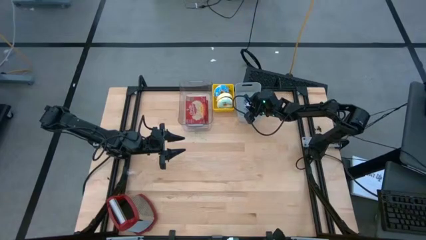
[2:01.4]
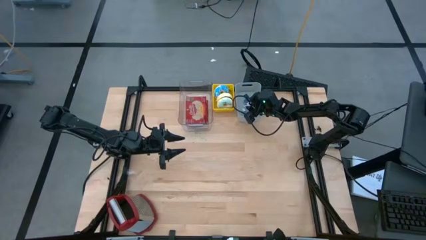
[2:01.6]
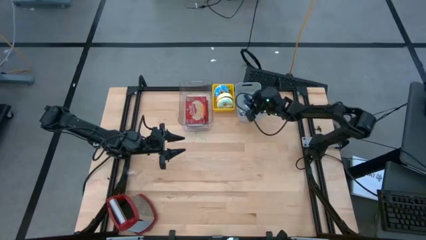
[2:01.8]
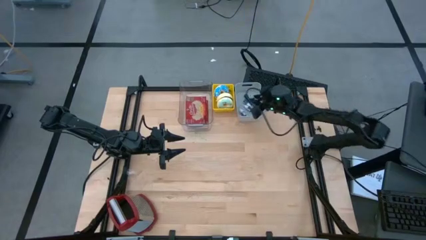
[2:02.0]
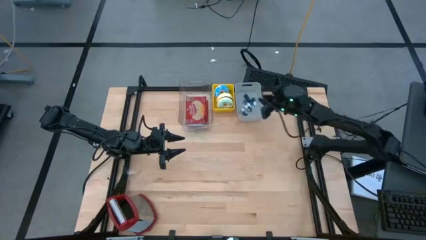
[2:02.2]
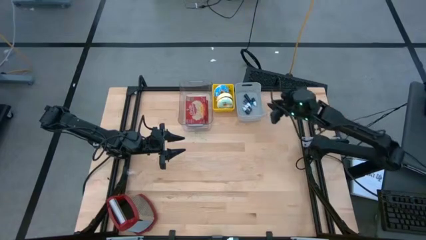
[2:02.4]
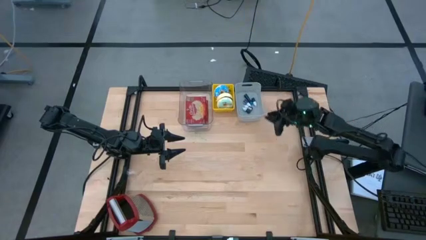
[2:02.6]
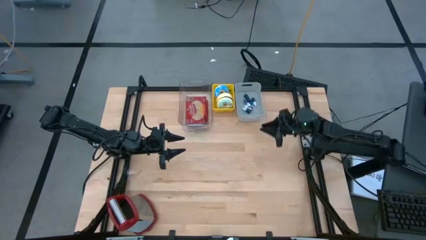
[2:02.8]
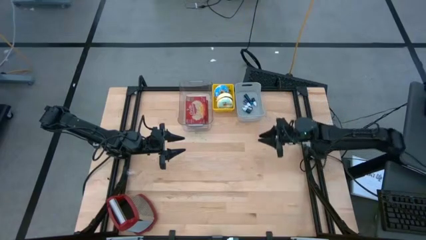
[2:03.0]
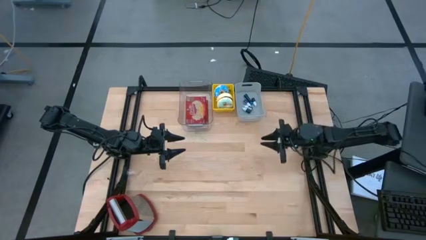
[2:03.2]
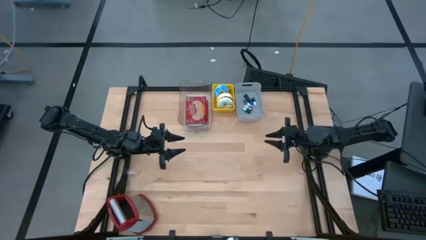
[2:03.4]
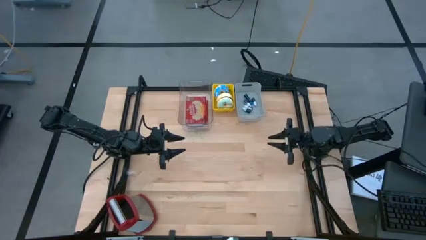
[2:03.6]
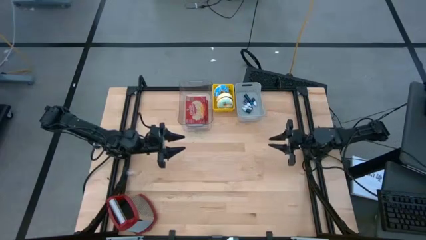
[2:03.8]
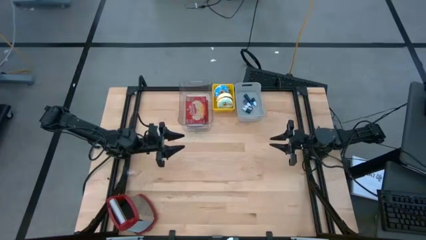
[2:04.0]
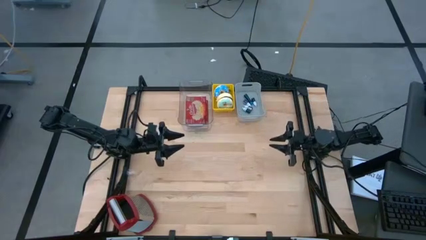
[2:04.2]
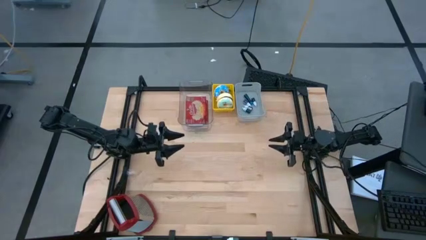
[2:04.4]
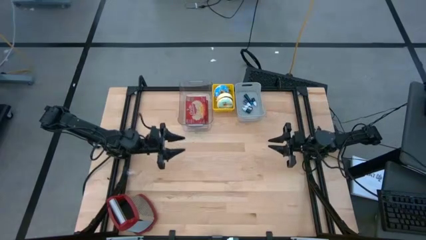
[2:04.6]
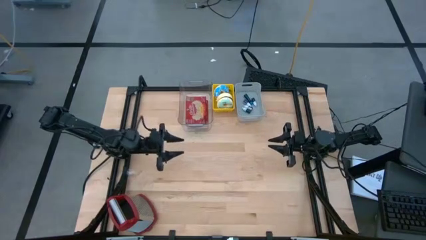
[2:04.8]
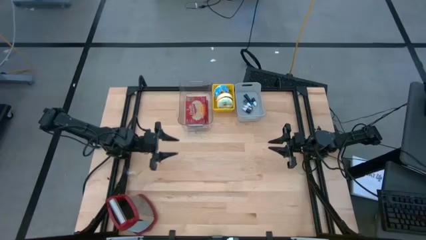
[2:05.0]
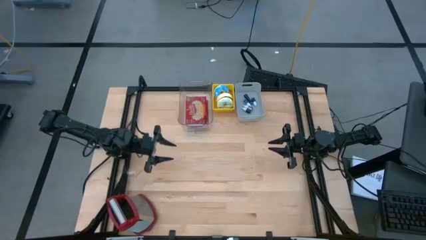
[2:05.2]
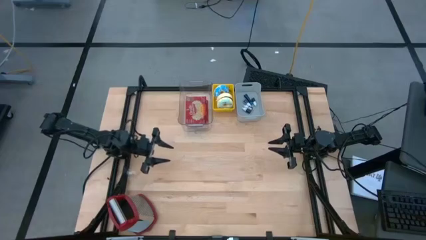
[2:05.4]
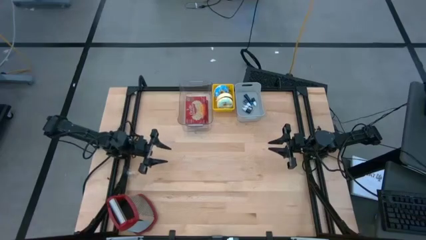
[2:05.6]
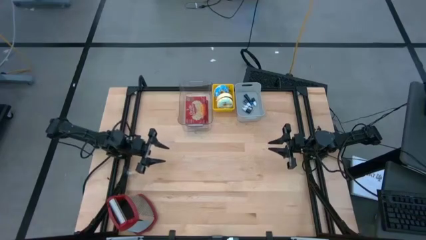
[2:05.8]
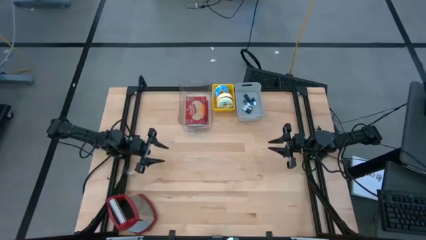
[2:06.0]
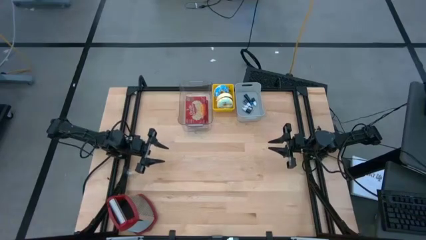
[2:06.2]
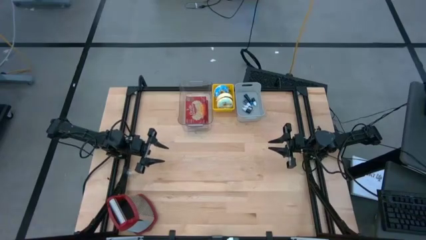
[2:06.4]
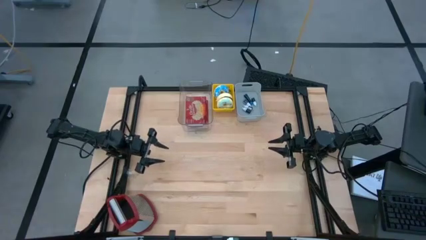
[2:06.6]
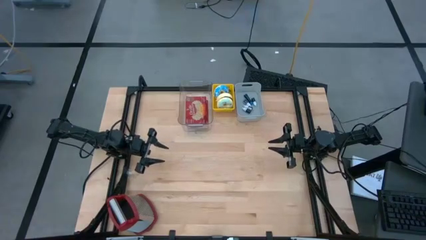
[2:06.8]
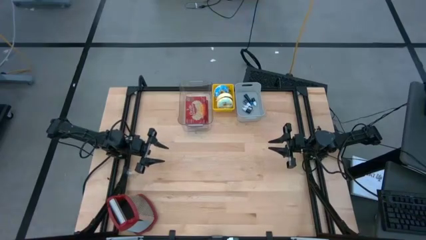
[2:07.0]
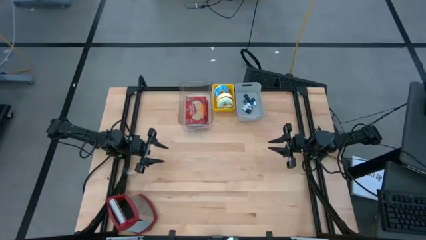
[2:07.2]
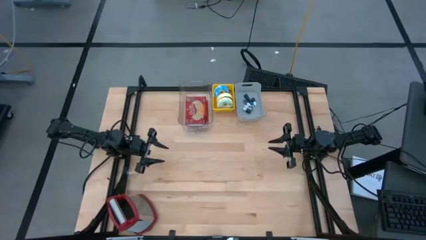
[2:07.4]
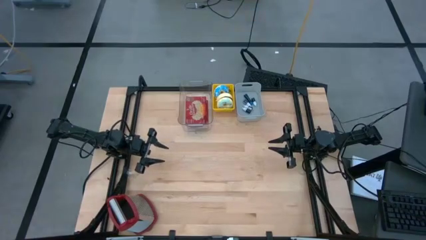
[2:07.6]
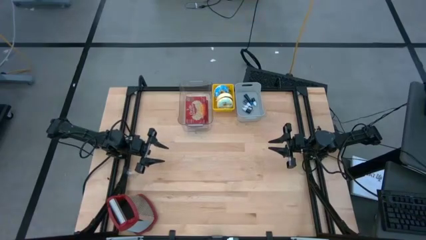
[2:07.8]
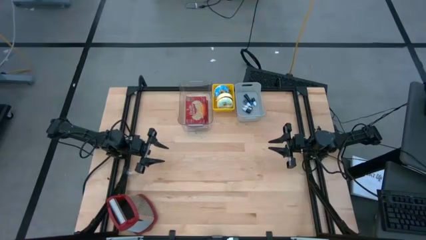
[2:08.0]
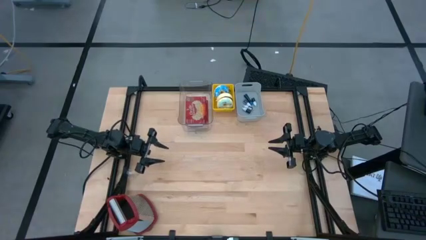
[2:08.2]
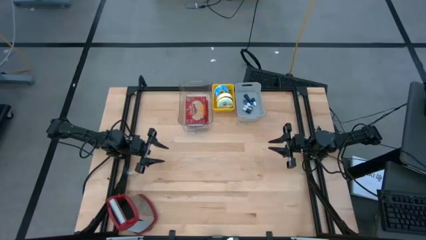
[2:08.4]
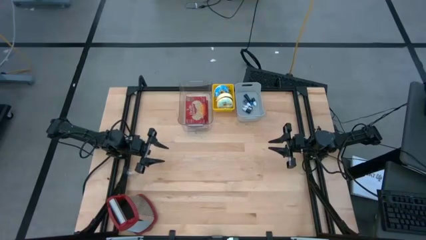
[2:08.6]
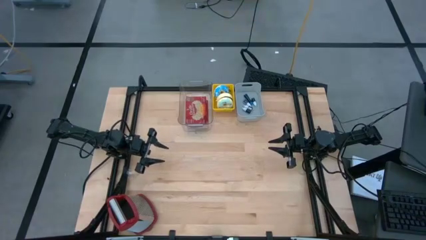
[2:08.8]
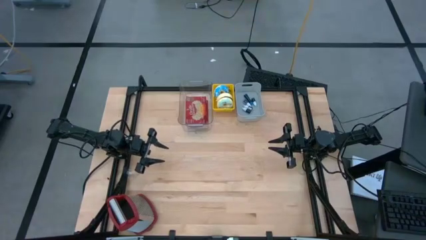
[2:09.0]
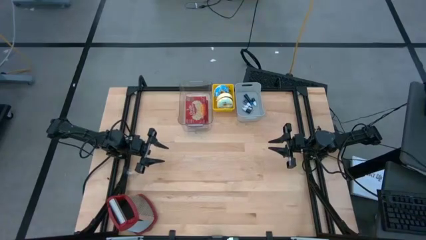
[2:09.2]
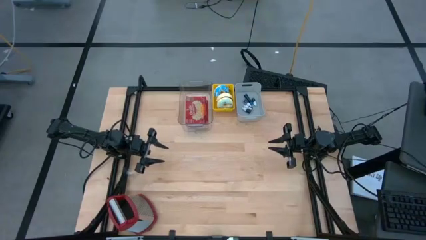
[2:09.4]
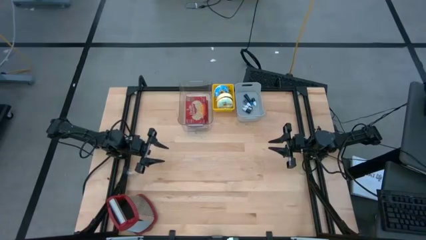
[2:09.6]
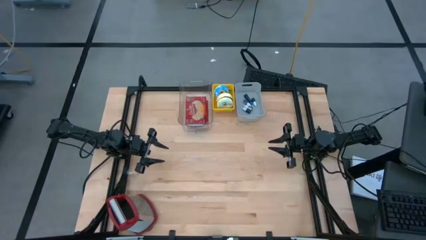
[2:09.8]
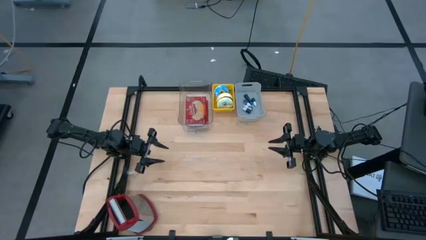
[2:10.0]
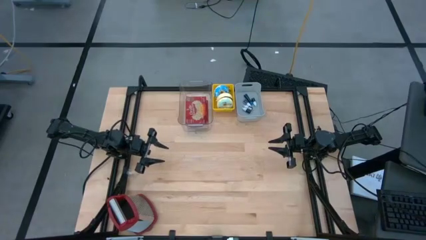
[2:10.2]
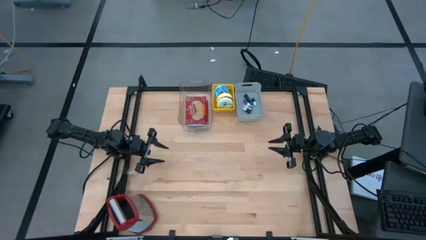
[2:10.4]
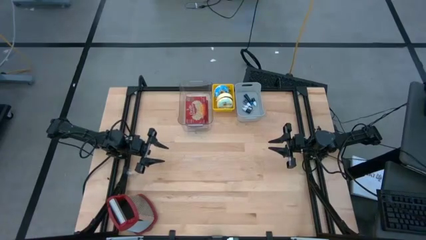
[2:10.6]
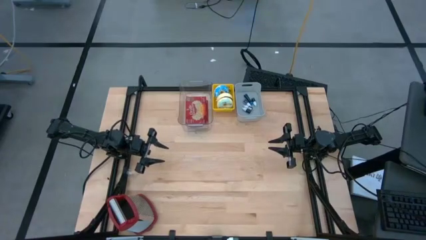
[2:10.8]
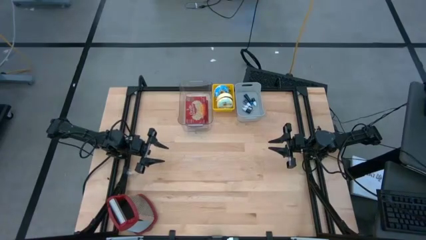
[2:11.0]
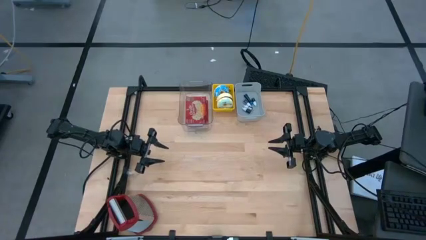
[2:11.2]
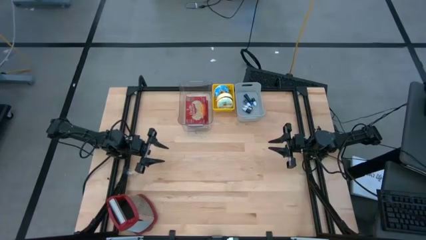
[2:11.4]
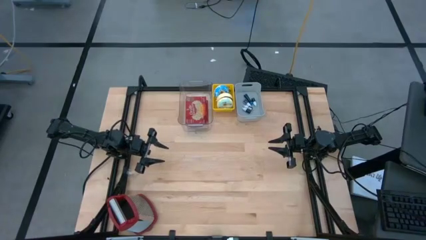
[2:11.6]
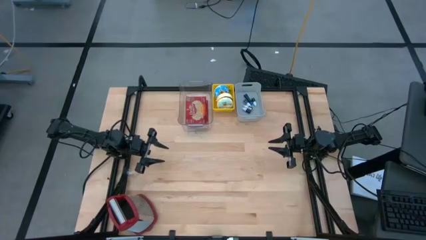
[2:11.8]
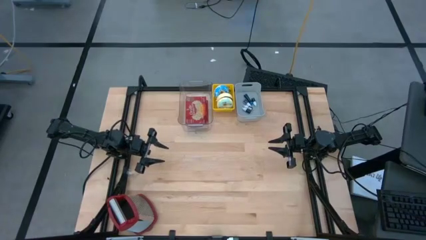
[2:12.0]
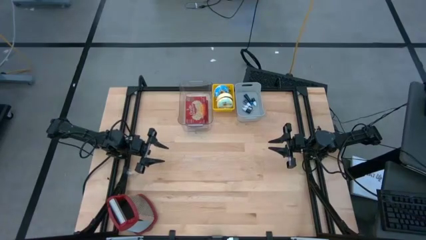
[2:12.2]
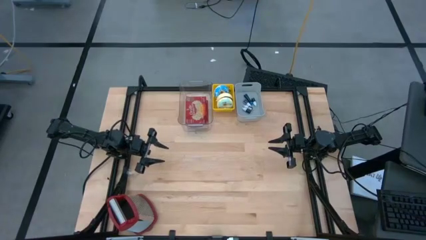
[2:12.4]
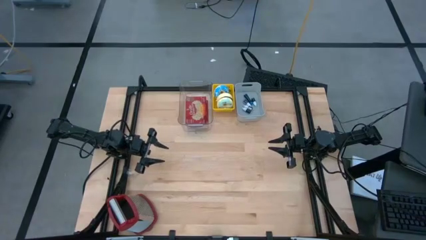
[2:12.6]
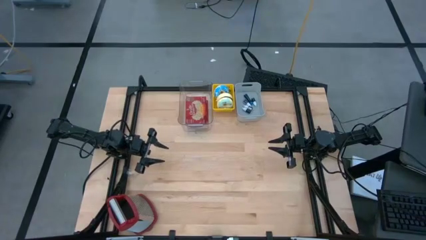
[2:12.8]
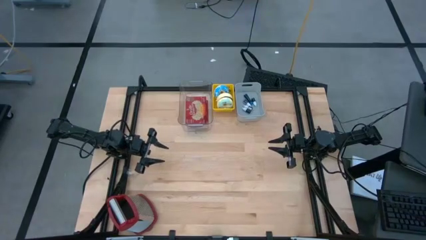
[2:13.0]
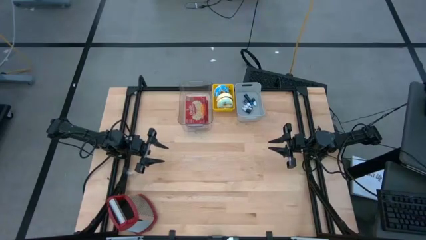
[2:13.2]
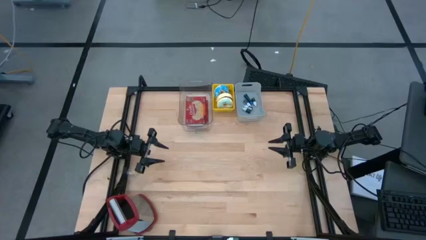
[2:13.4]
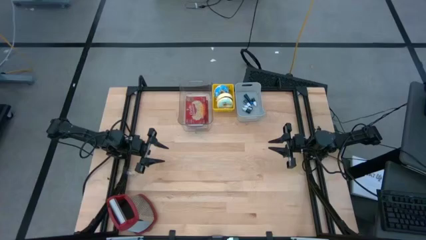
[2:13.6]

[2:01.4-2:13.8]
Return to Home Position
